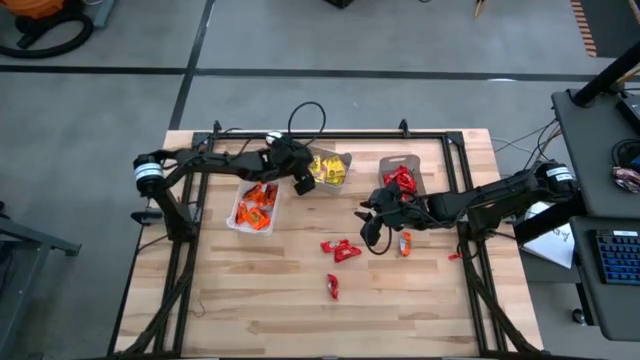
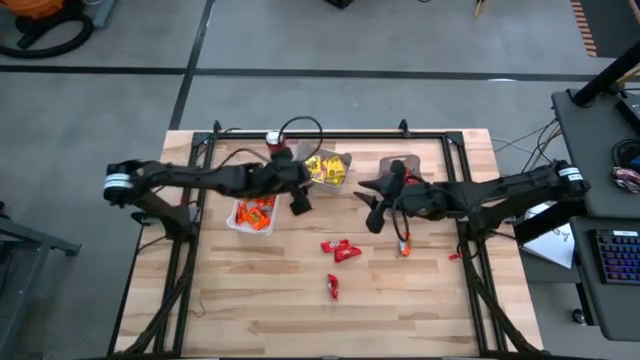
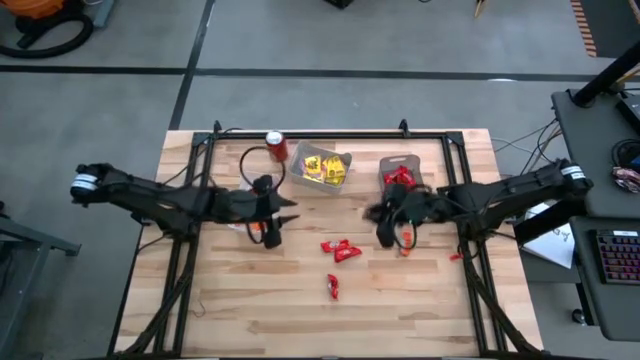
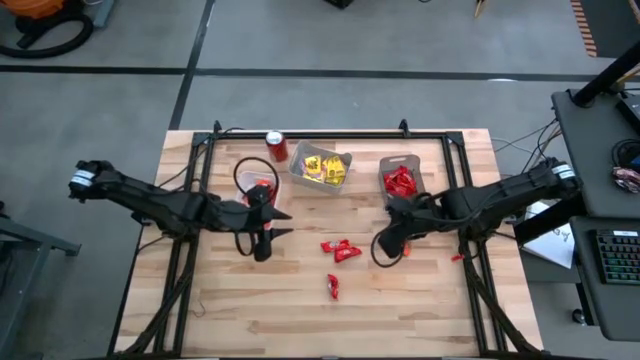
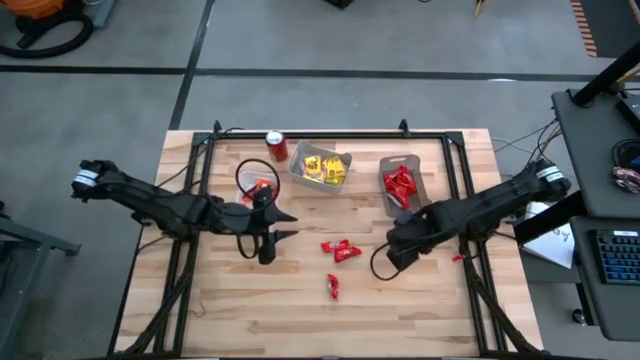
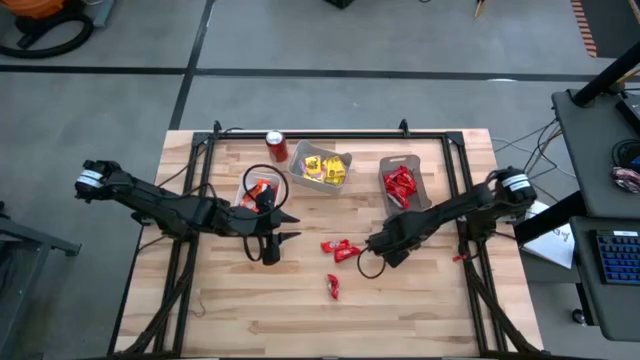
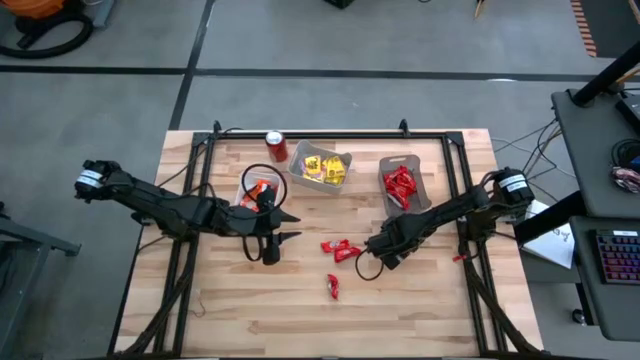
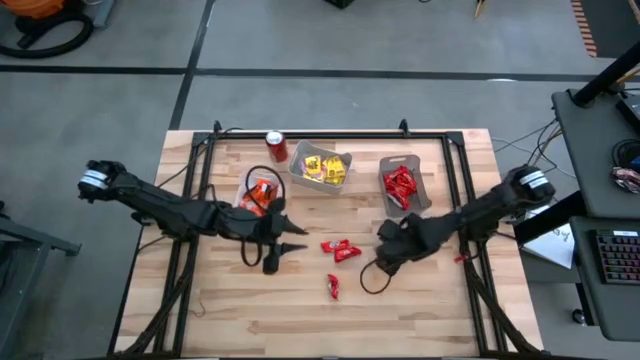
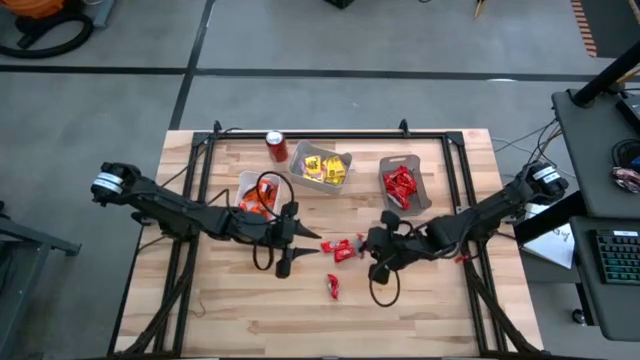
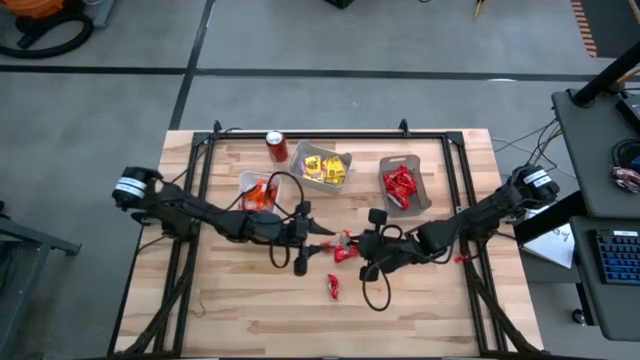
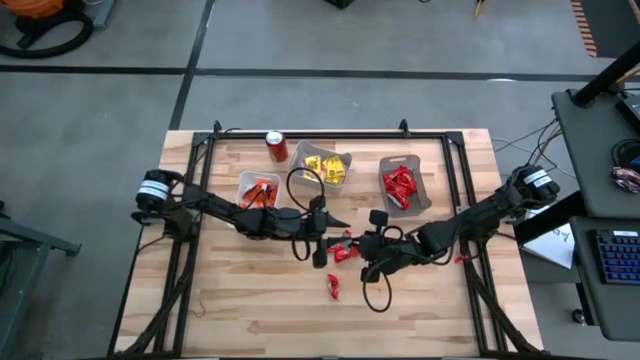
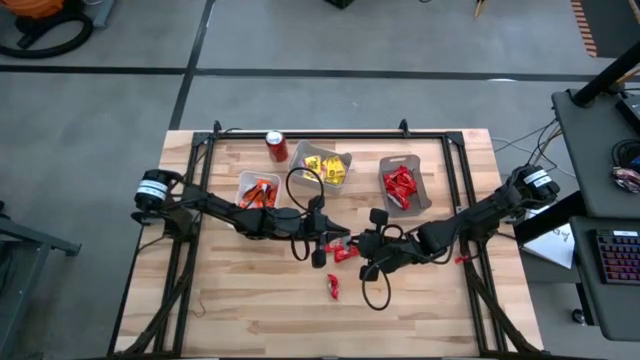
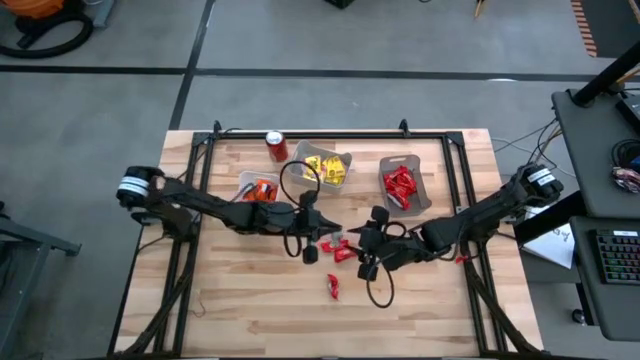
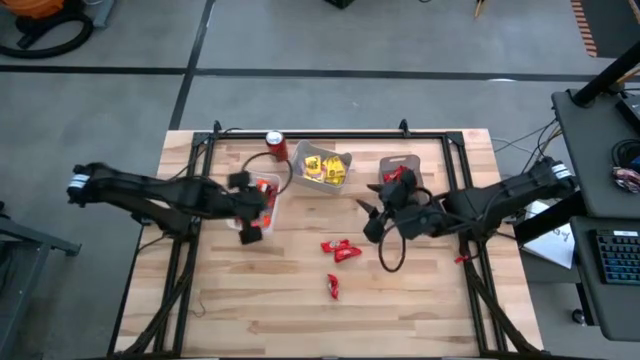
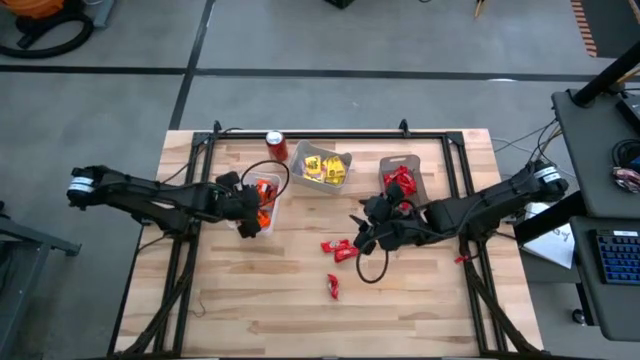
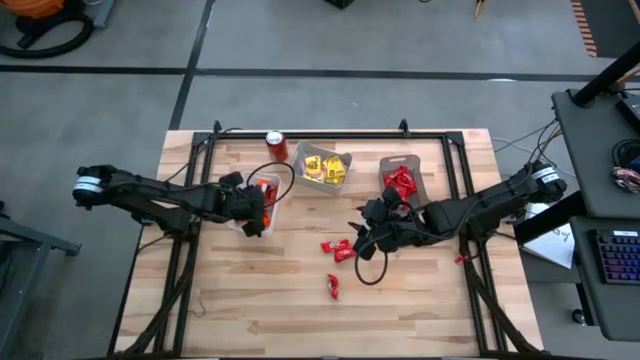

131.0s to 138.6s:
Task: Sort candy
Put the orange chocolate into the white bin

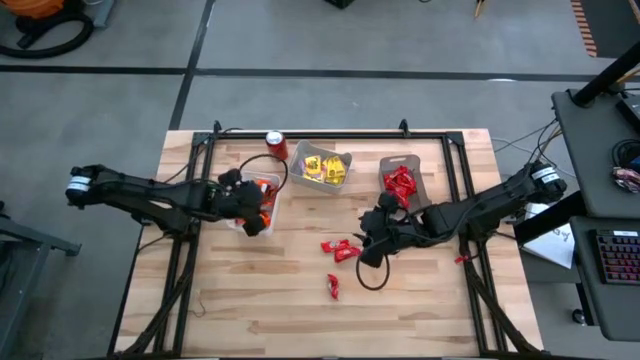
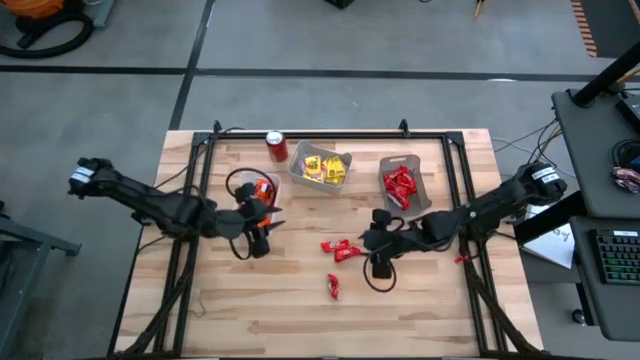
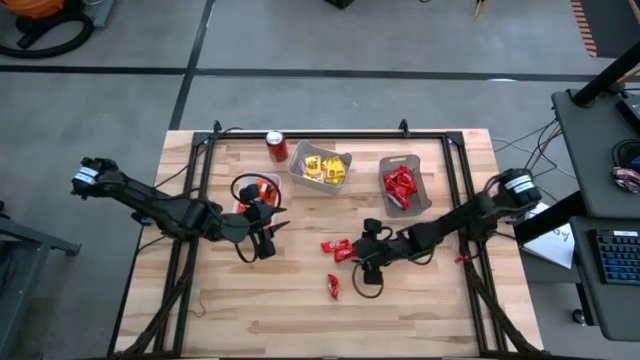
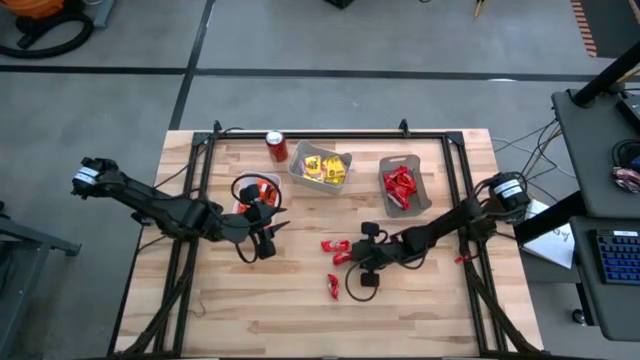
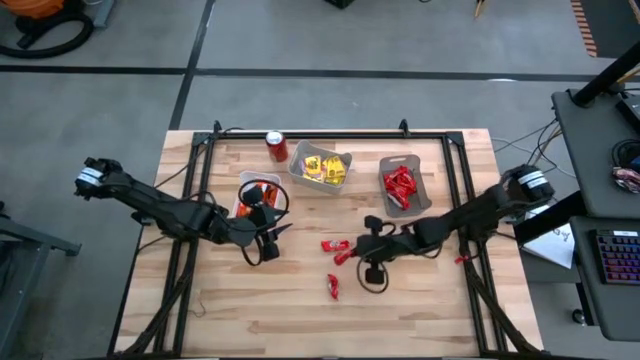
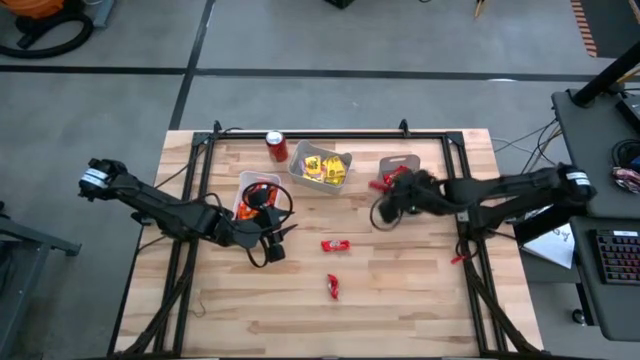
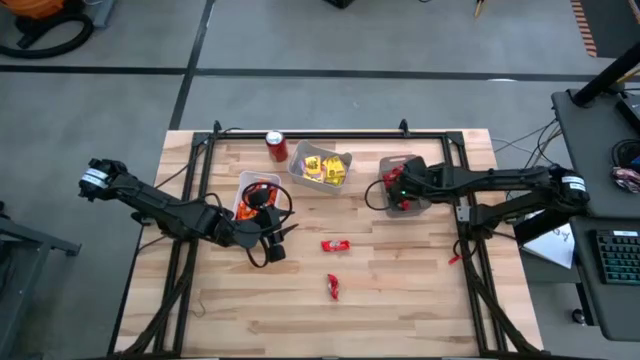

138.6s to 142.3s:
Put the red chocolate into the black bin

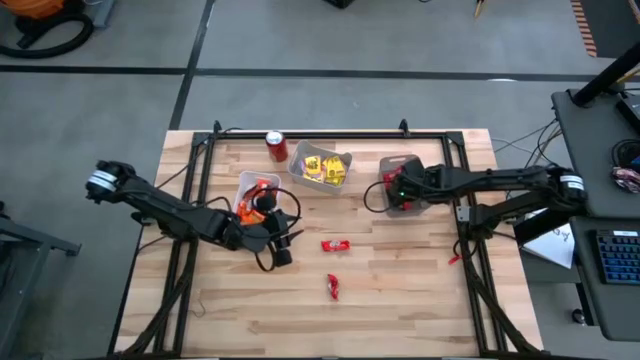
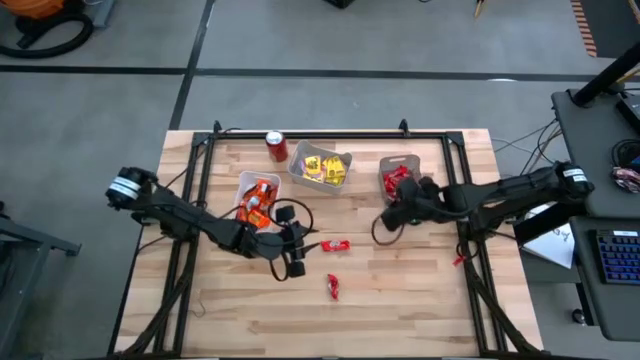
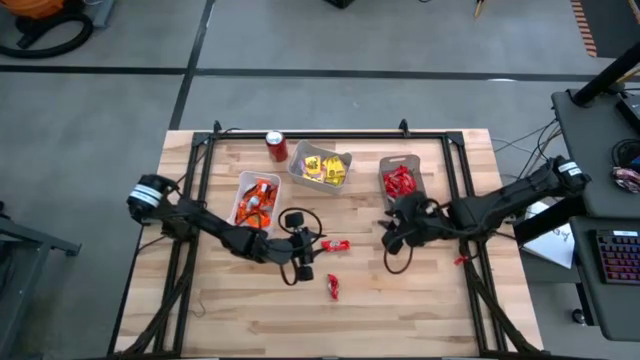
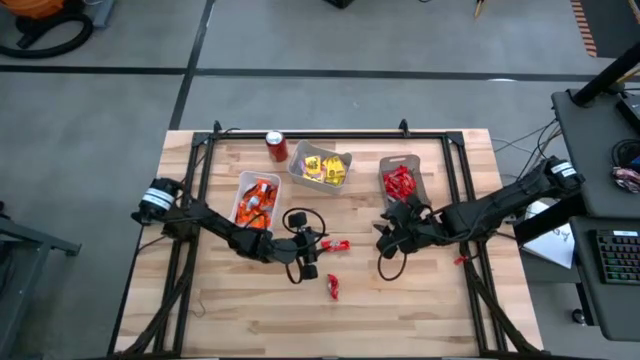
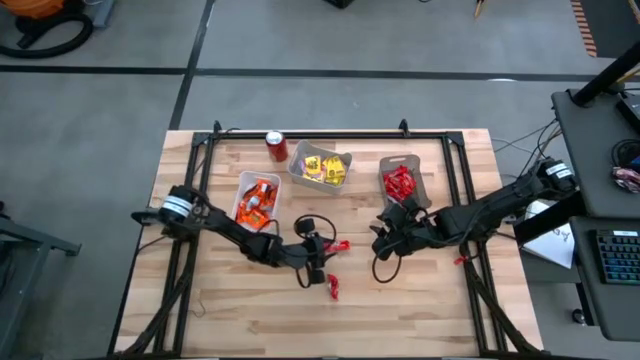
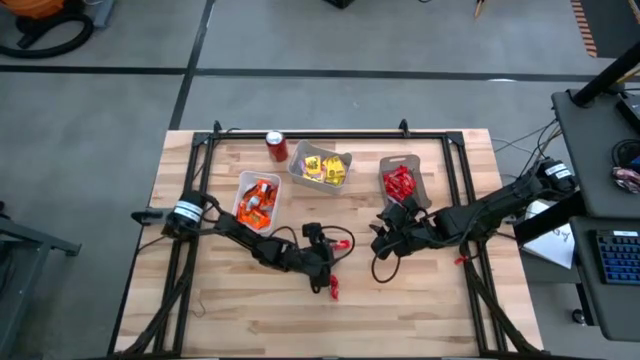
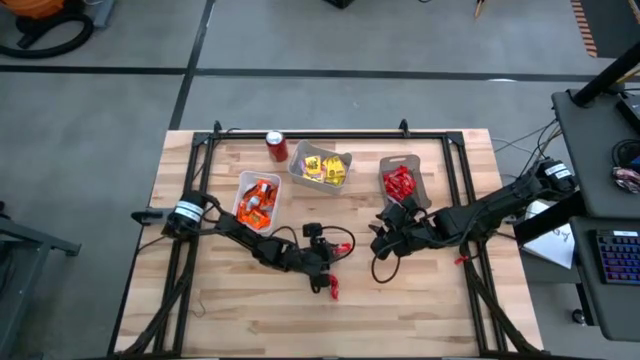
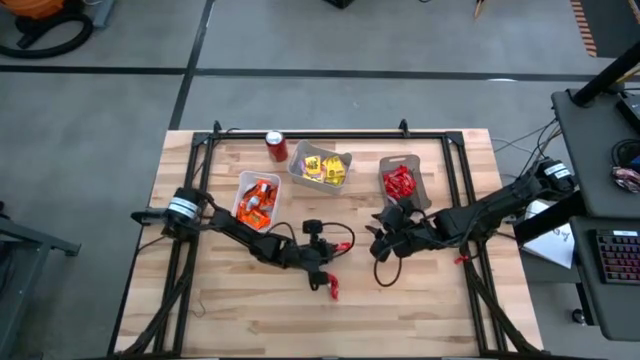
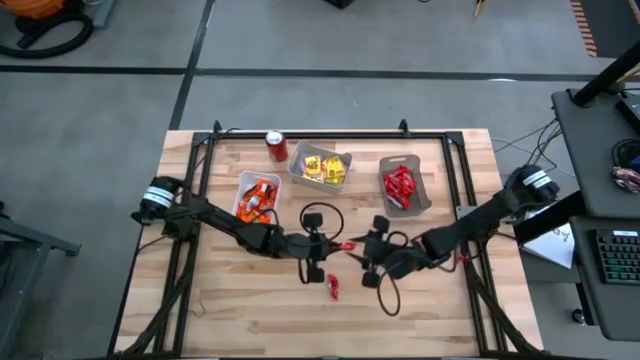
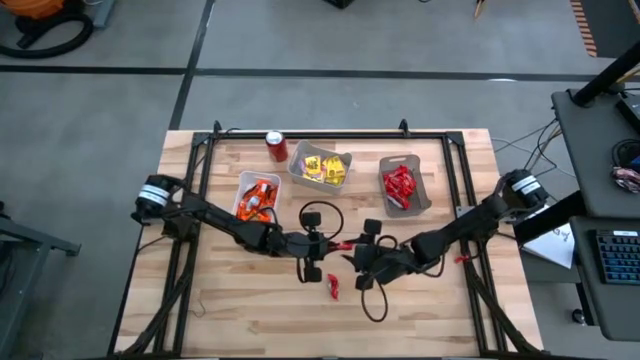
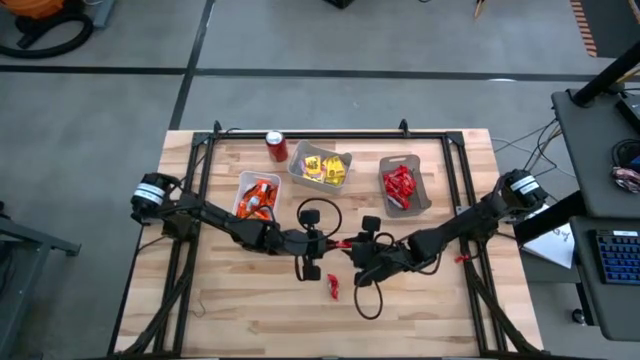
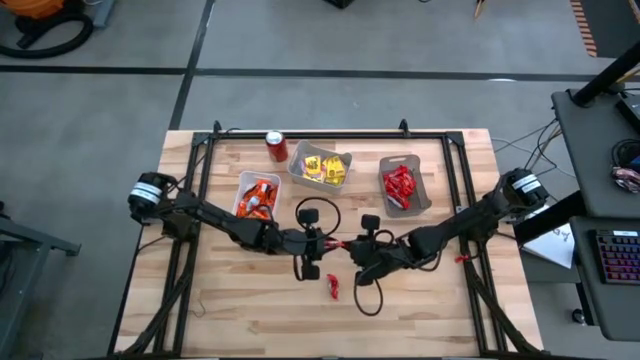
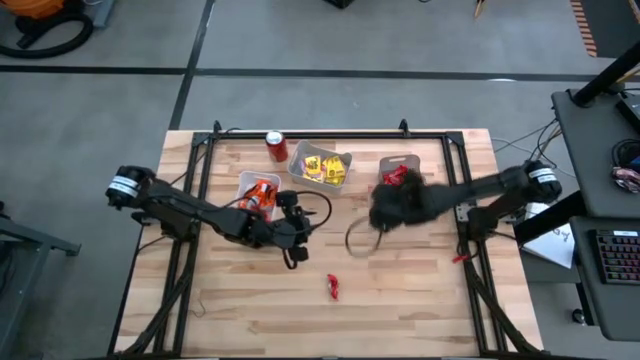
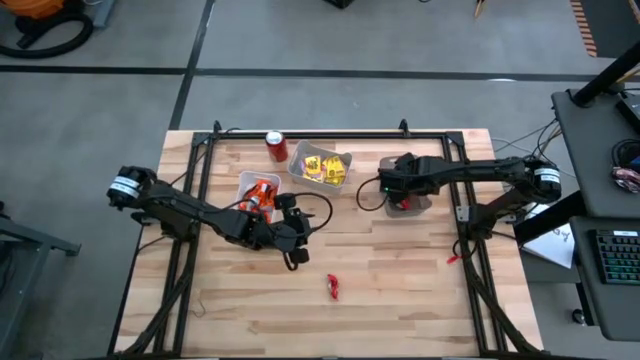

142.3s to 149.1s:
Put the red chocolate into the black bin

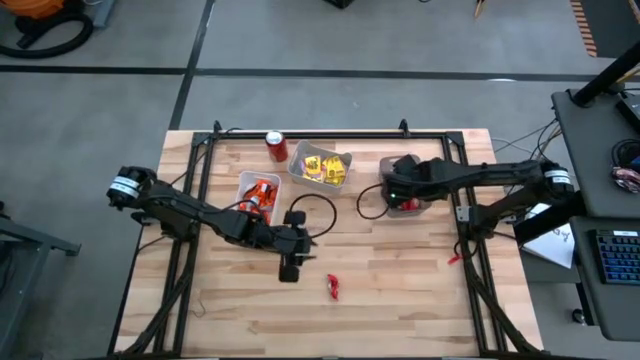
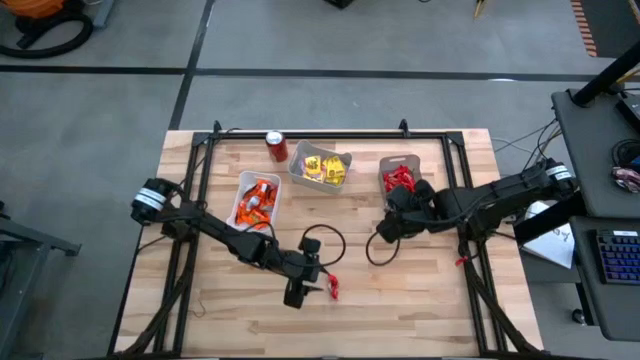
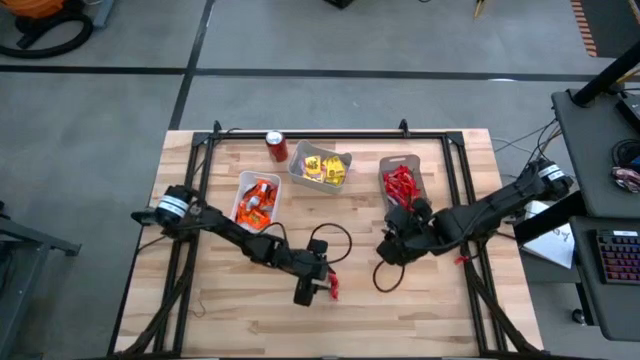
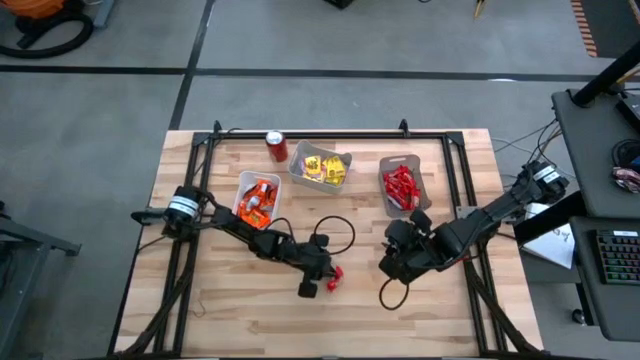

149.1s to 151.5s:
Put the red chocolate into the black bin

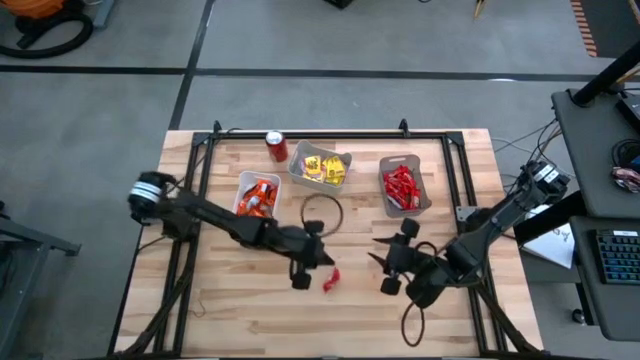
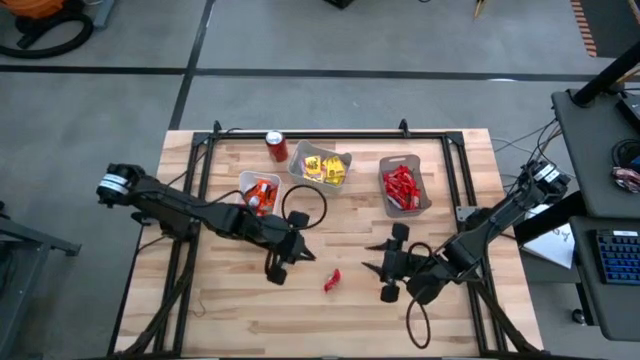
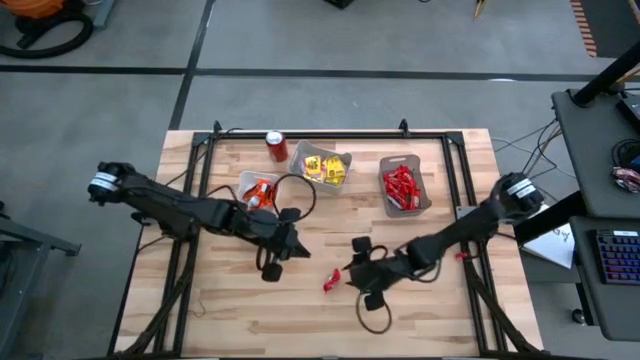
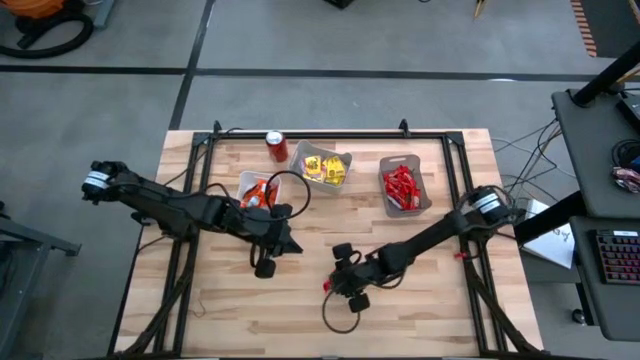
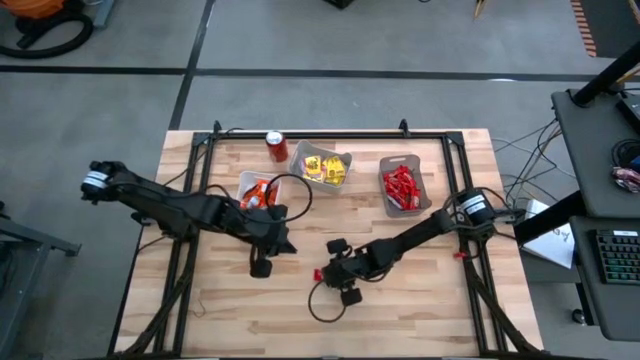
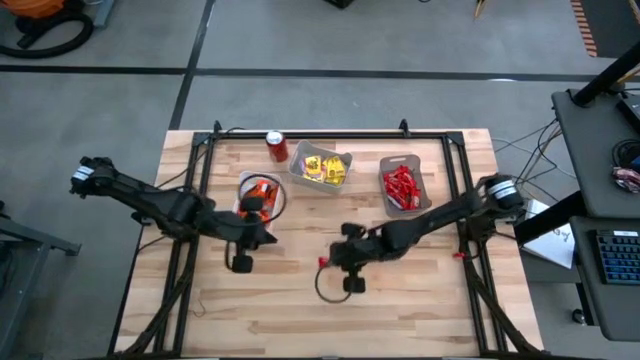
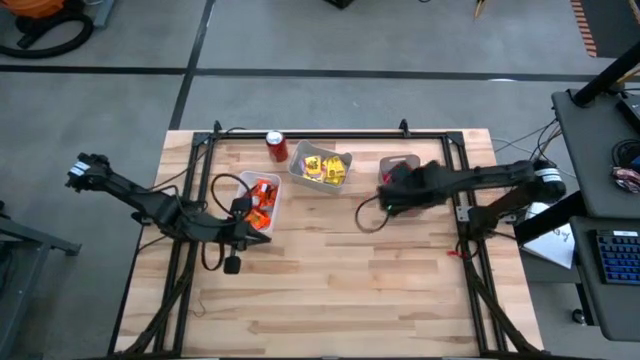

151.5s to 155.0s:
Put the red chocolate into the black bin
